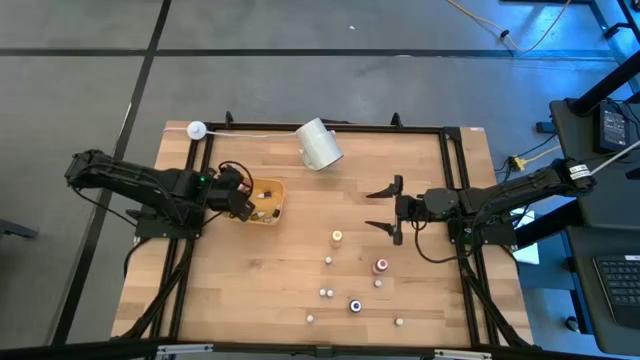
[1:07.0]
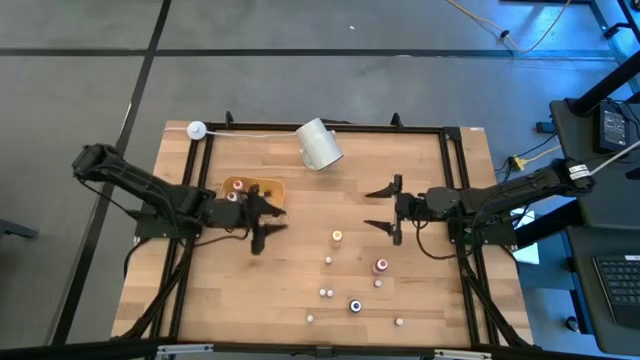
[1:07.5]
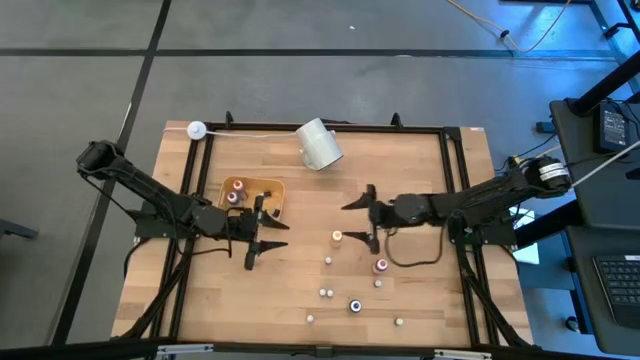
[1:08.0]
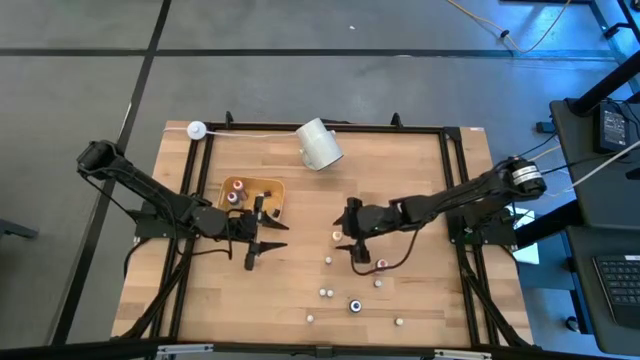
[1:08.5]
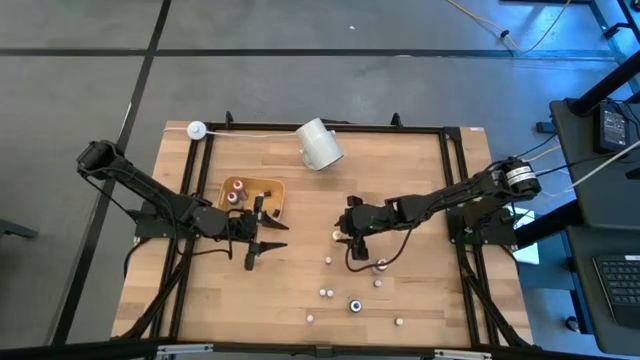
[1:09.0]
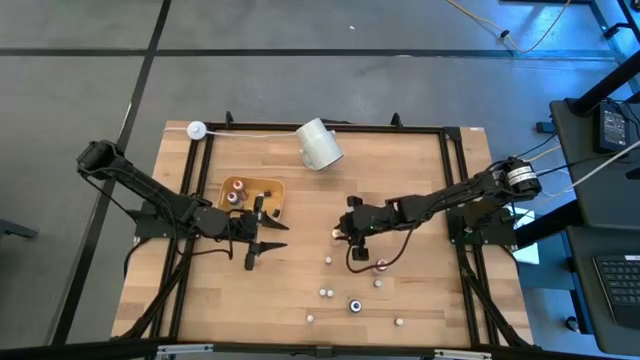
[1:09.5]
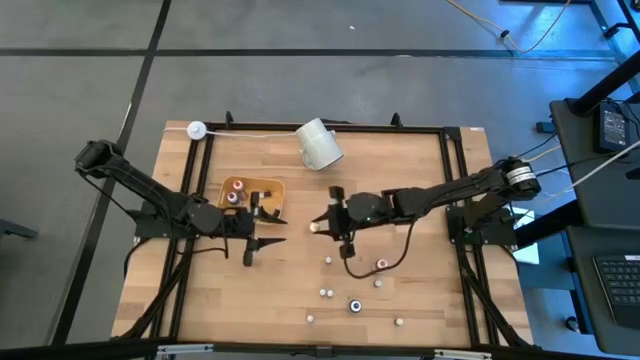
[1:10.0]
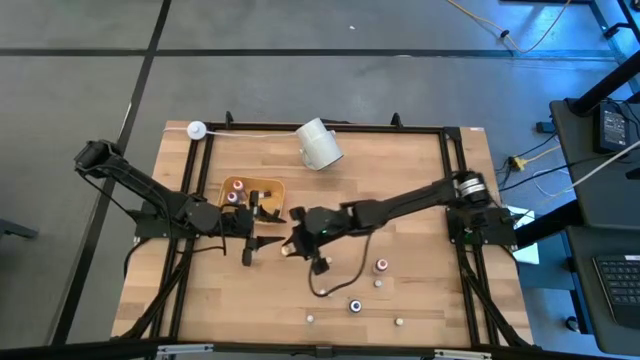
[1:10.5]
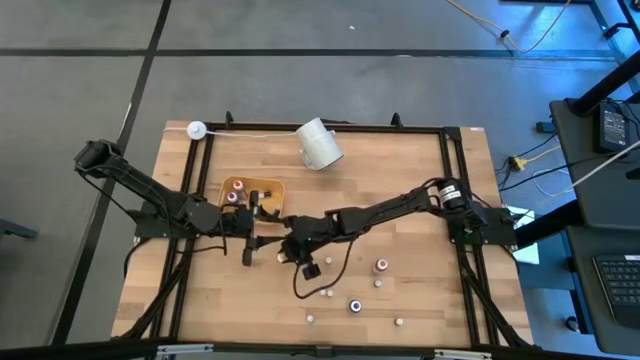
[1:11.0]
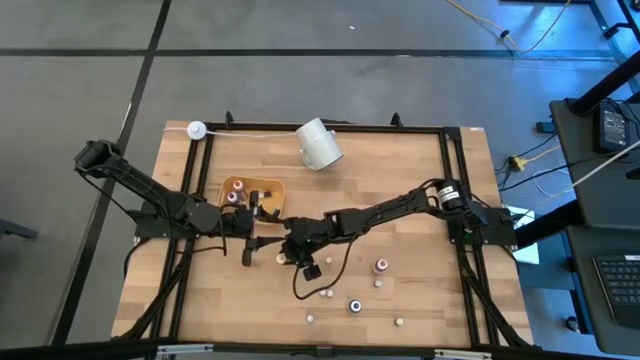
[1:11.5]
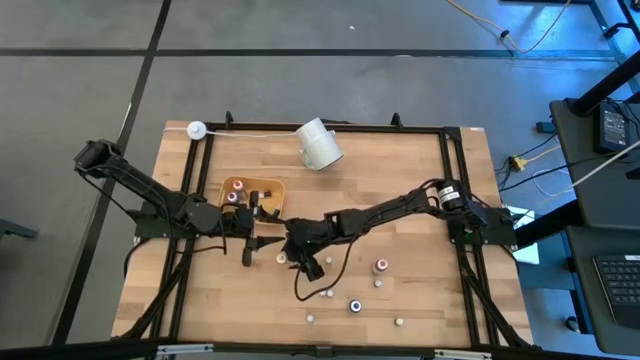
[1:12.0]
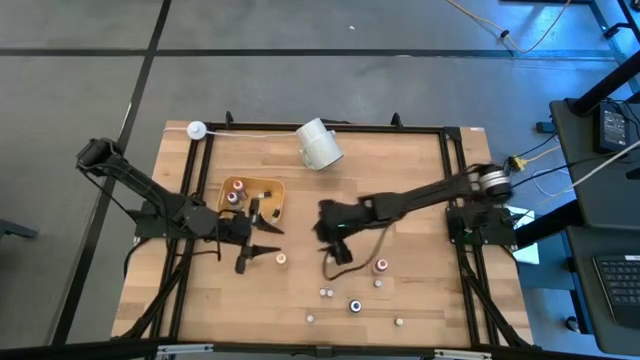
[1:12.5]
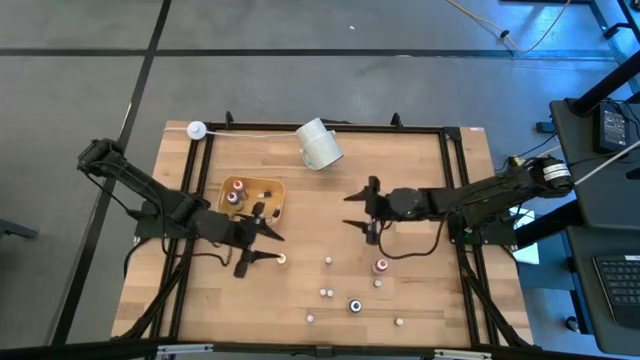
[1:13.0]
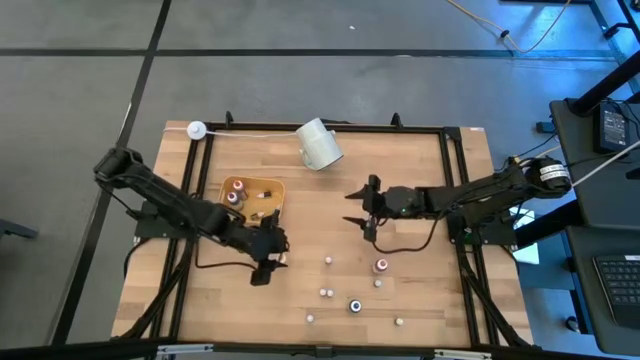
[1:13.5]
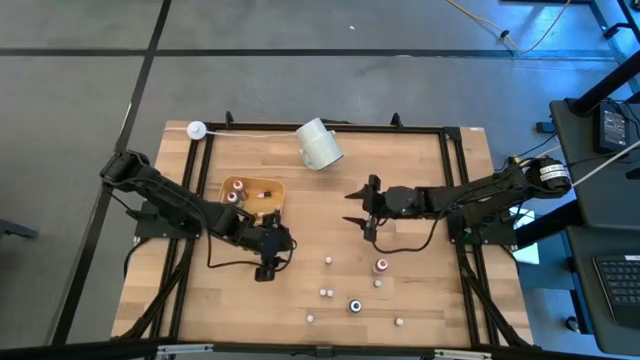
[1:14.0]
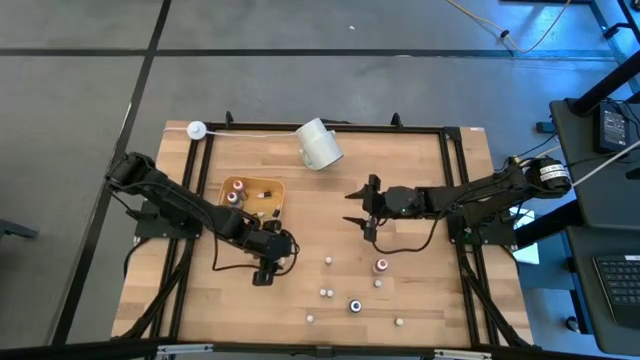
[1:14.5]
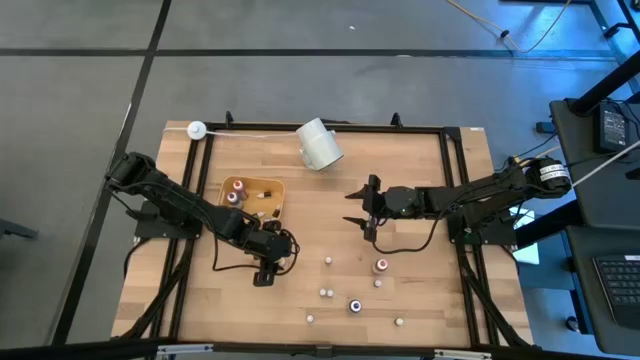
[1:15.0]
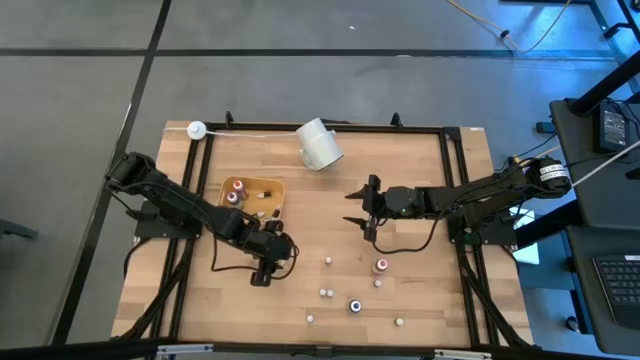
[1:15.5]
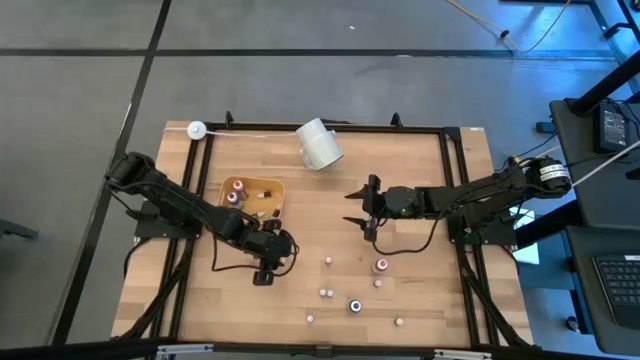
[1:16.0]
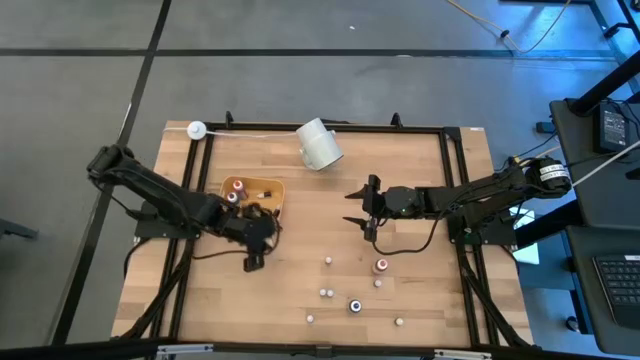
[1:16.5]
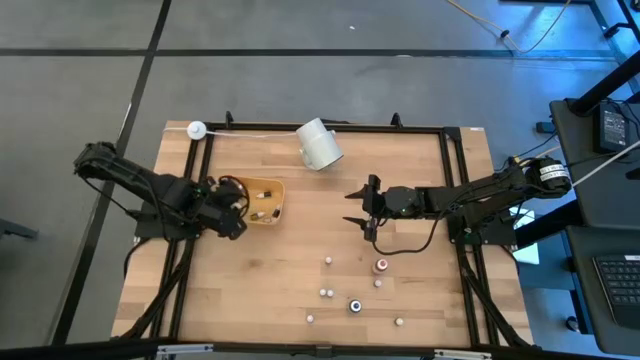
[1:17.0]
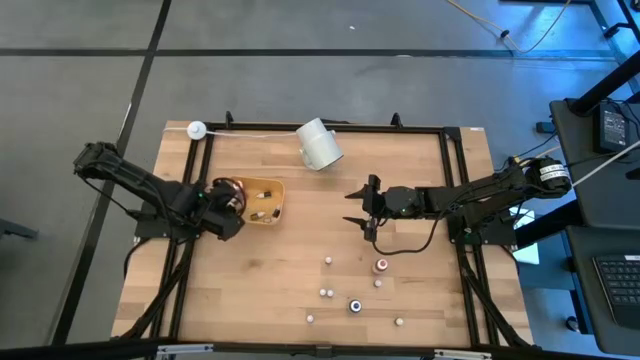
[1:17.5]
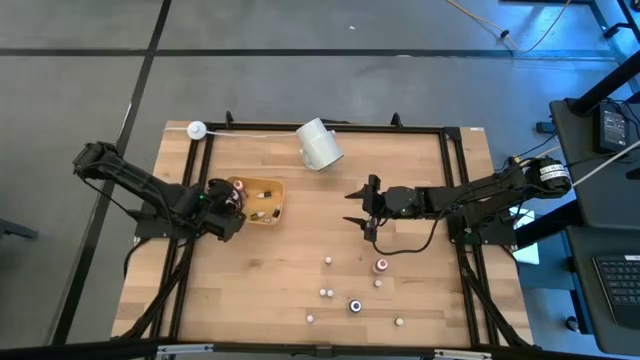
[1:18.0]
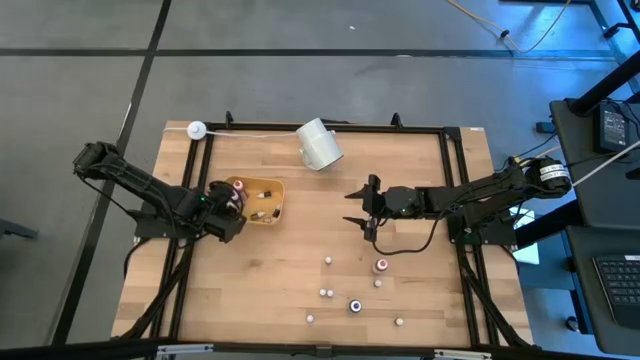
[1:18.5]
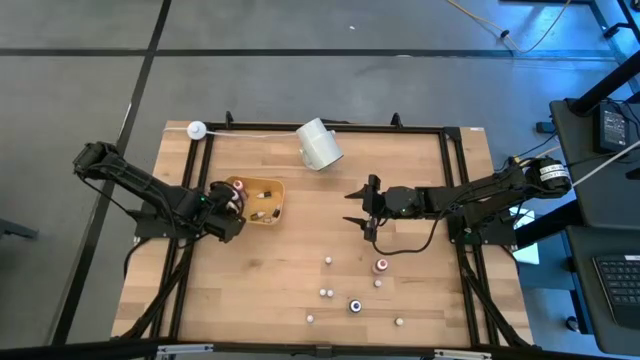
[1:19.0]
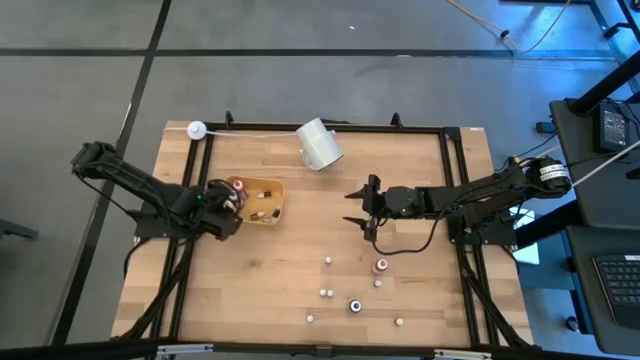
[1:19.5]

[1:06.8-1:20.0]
Task: Pick & Place food coloring
Put the large yellow food coloring bottle into the bin

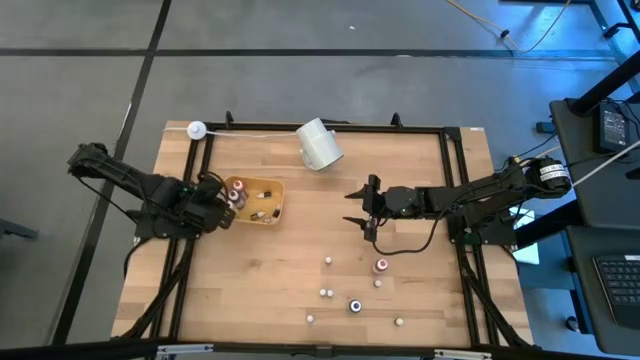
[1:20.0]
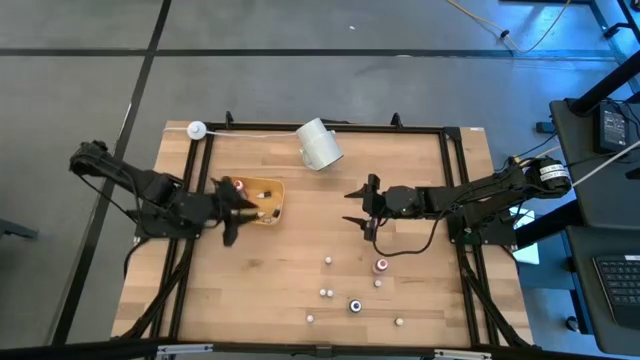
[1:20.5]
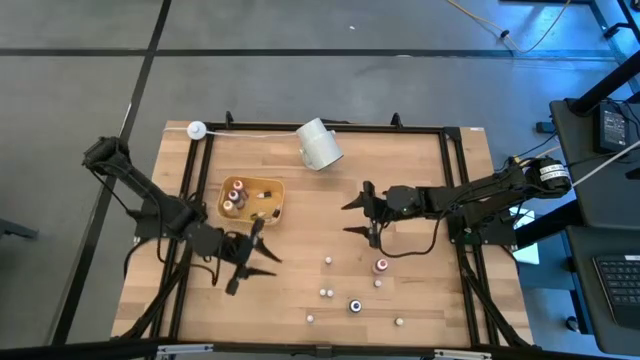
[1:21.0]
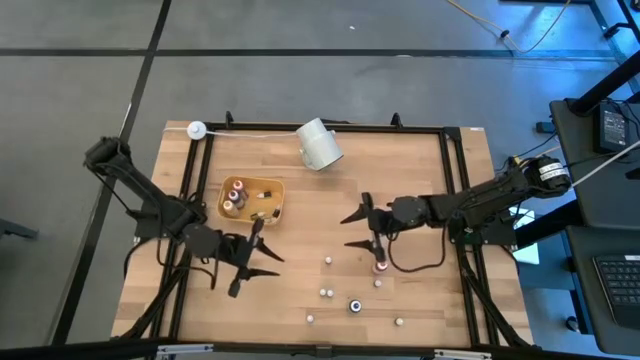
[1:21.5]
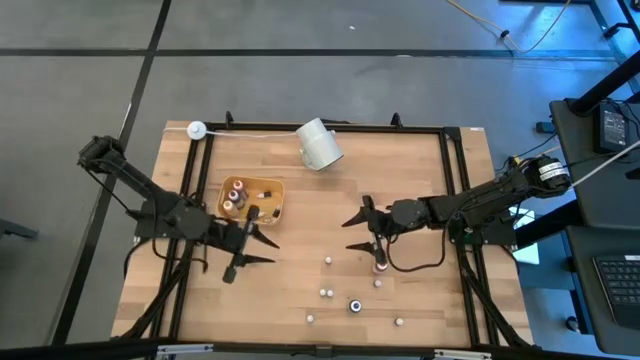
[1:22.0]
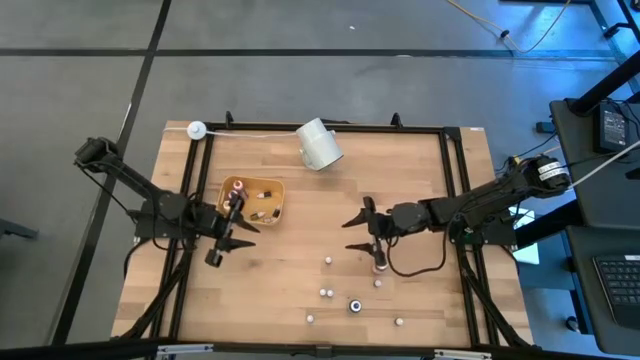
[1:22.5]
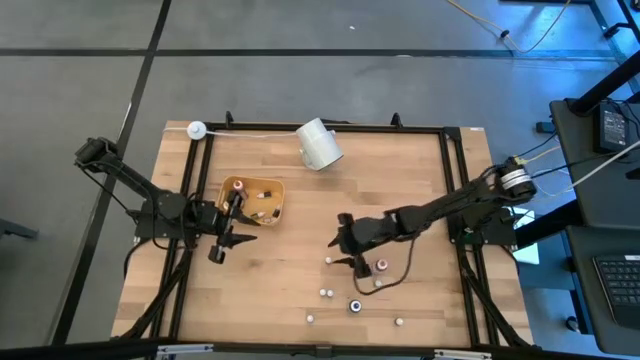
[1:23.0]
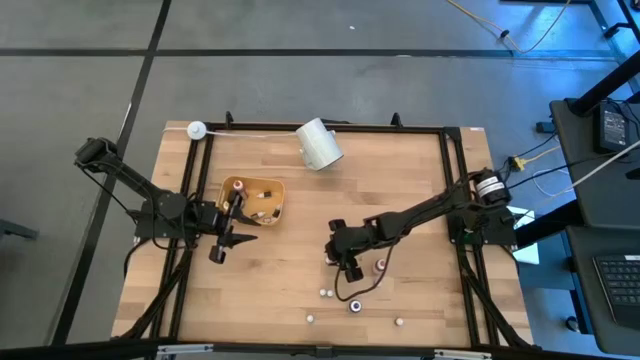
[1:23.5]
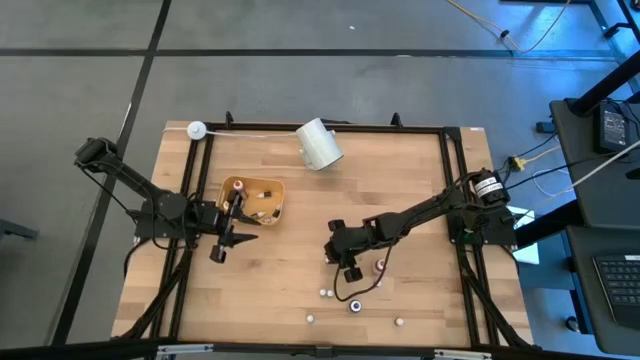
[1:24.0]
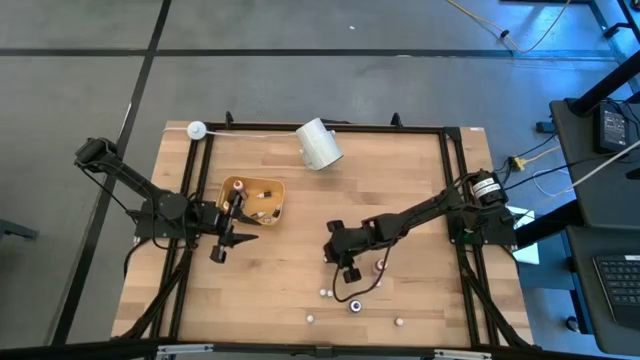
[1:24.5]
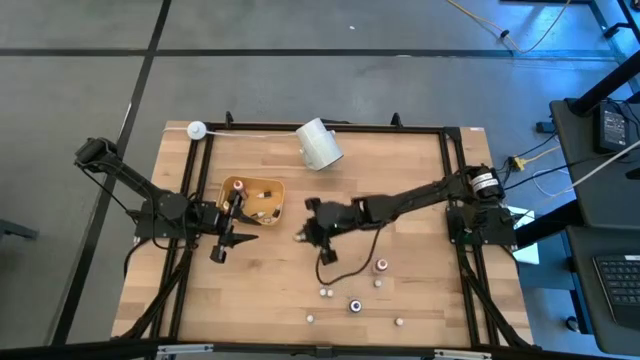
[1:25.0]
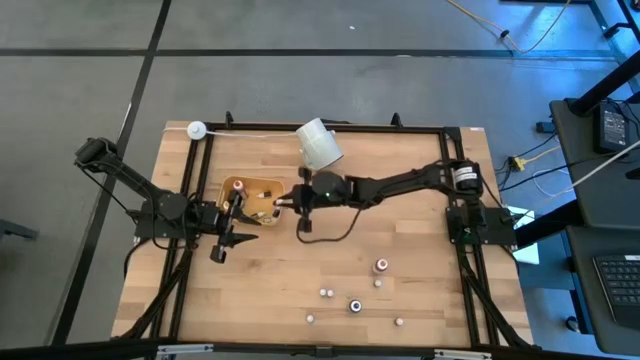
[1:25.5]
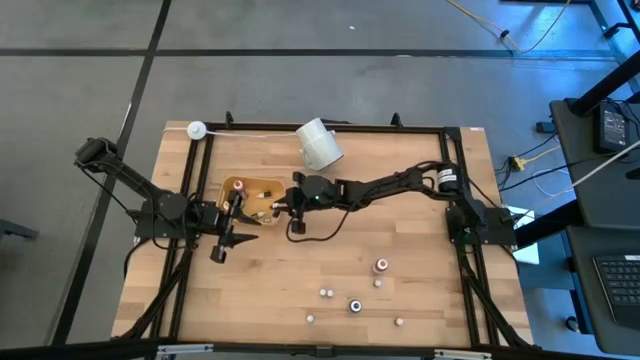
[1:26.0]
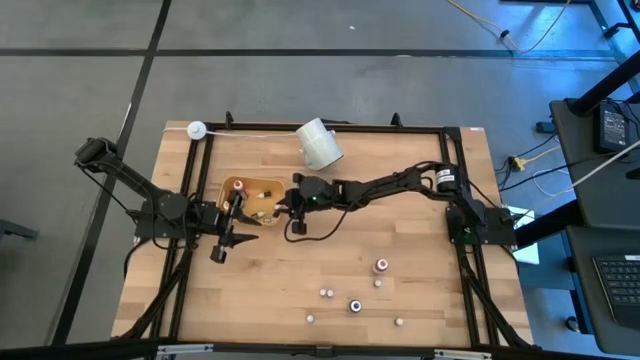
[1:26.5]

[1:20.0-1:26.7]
Put the small pink food coloring bottle into the bin
